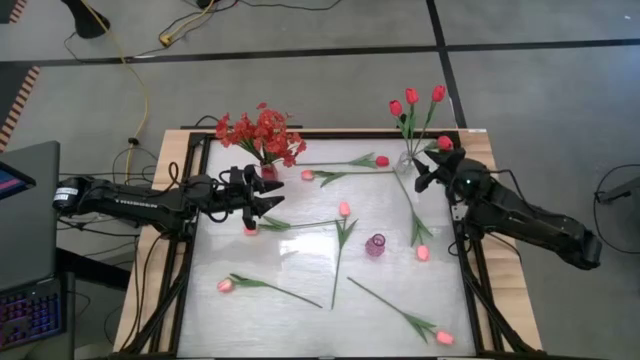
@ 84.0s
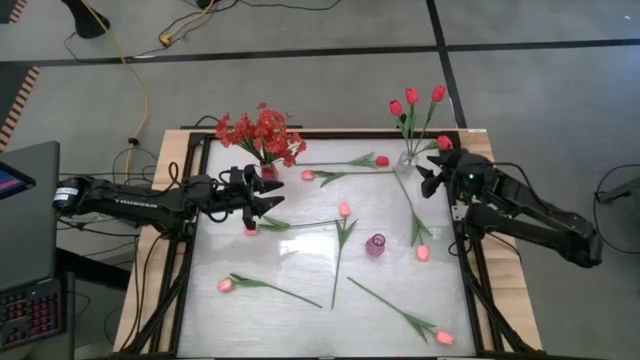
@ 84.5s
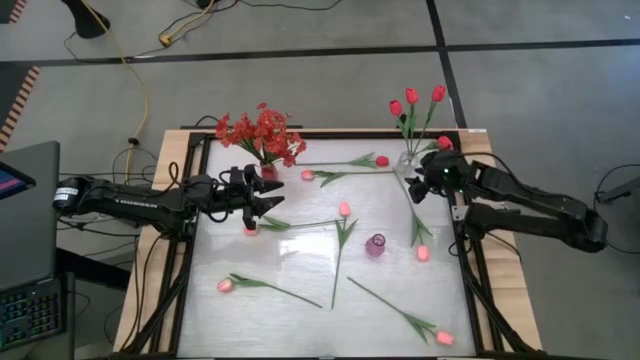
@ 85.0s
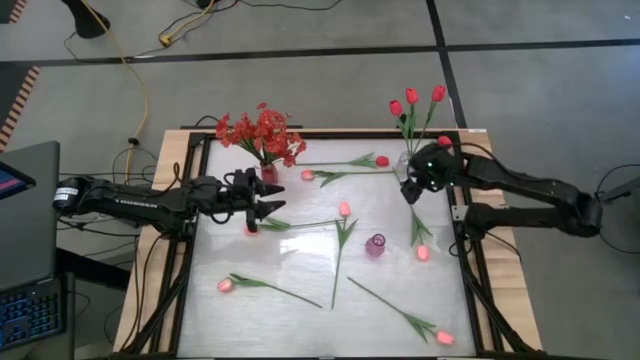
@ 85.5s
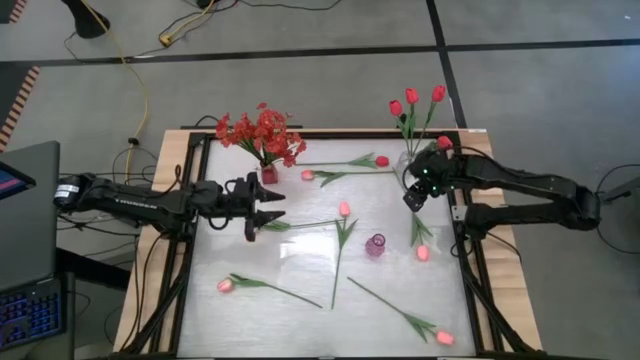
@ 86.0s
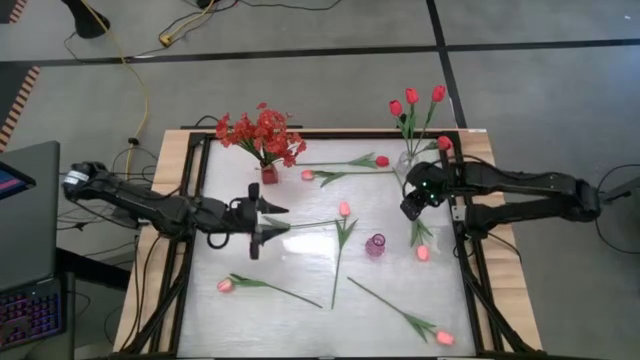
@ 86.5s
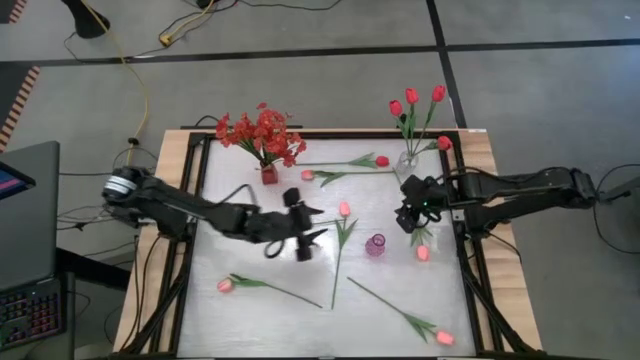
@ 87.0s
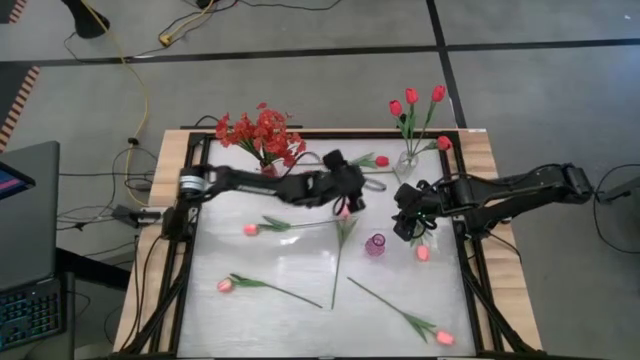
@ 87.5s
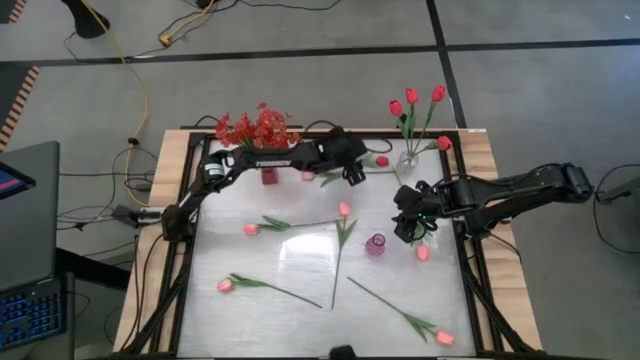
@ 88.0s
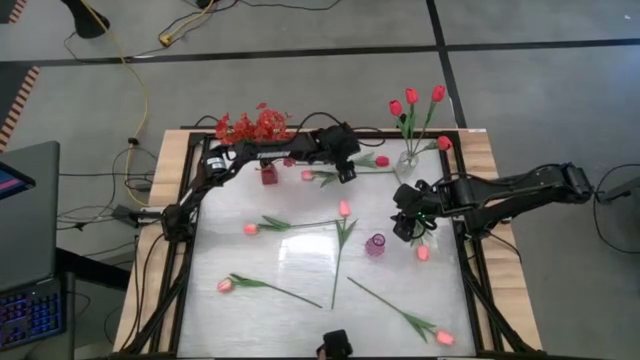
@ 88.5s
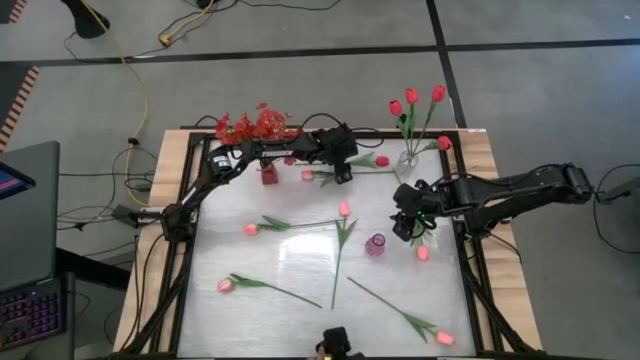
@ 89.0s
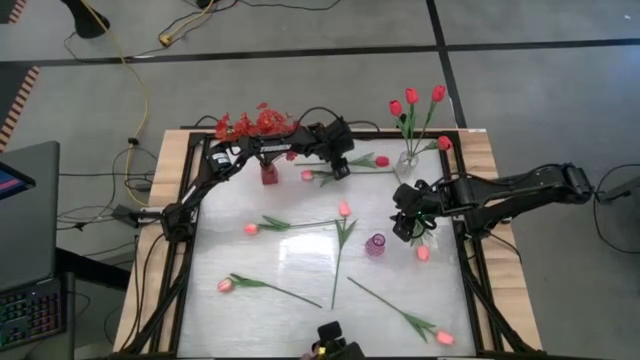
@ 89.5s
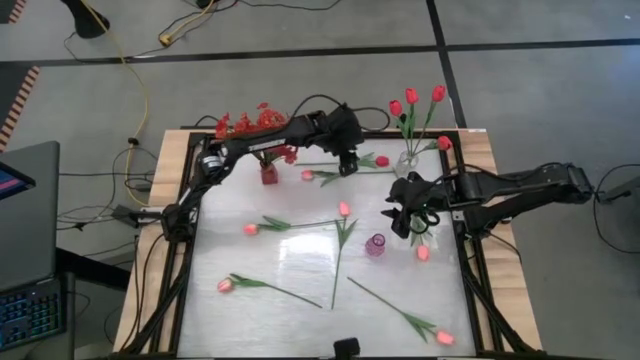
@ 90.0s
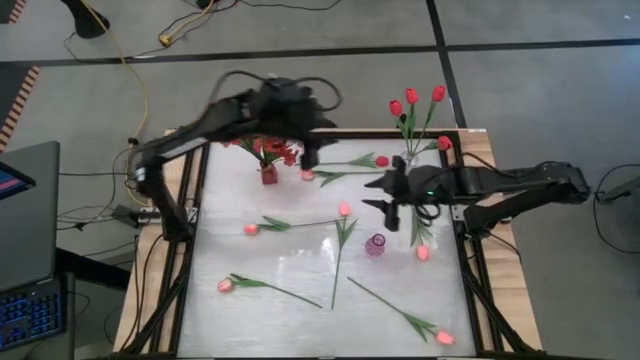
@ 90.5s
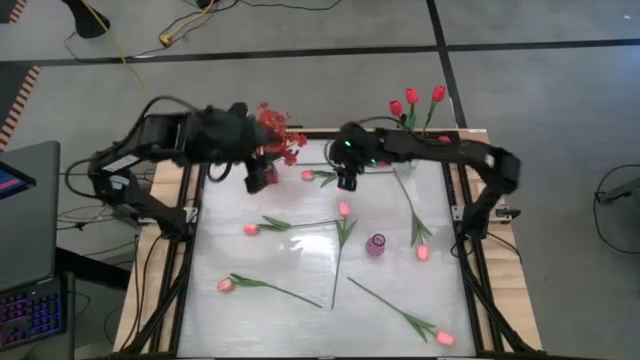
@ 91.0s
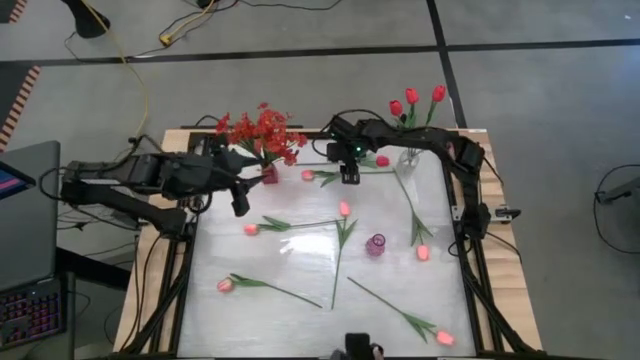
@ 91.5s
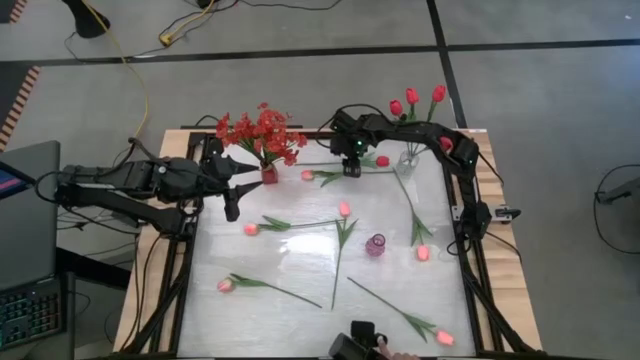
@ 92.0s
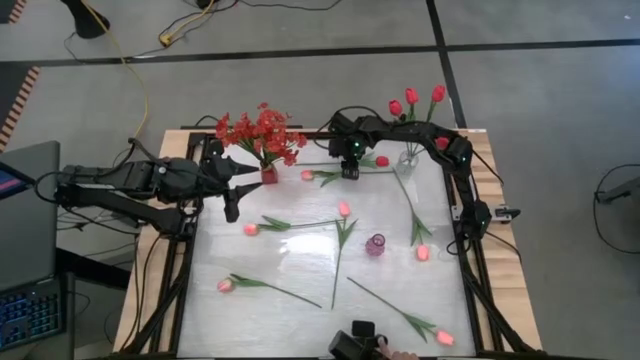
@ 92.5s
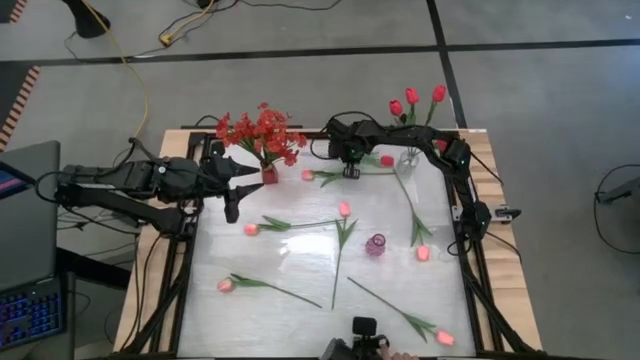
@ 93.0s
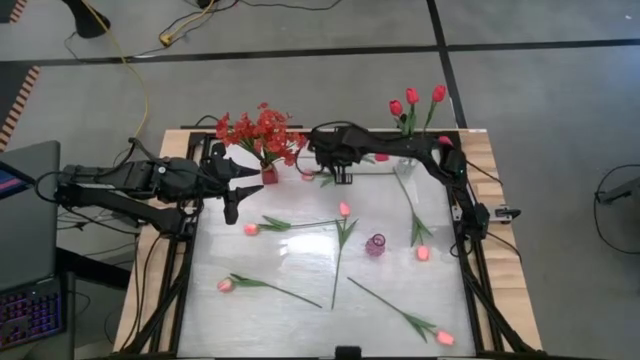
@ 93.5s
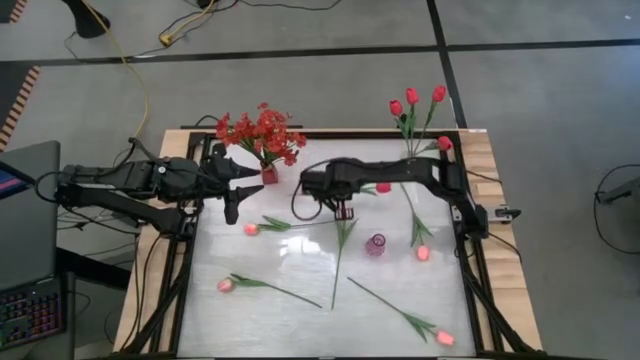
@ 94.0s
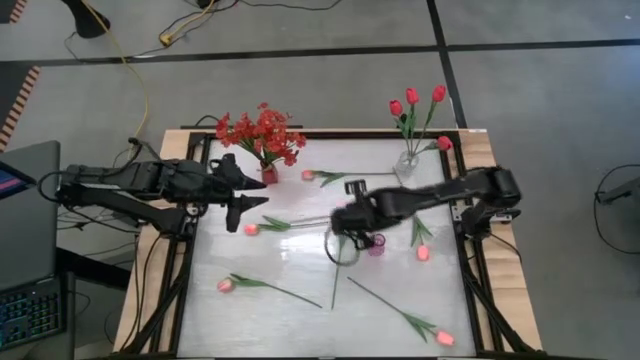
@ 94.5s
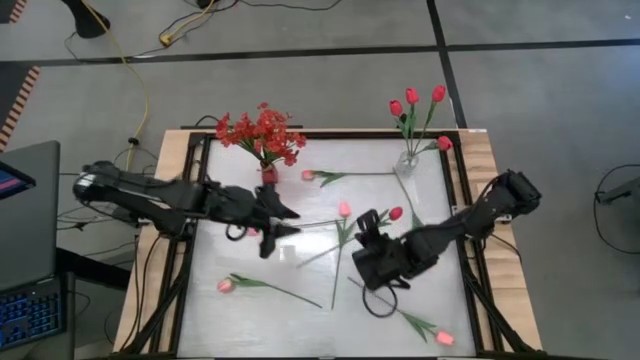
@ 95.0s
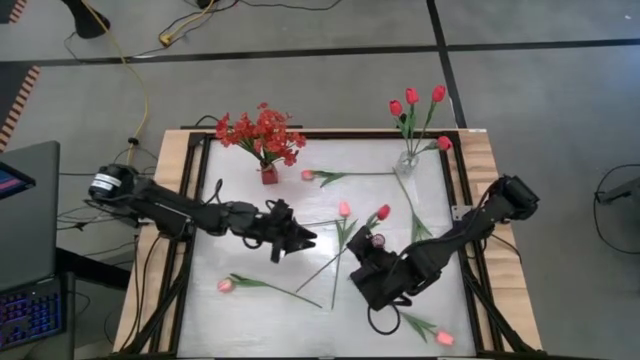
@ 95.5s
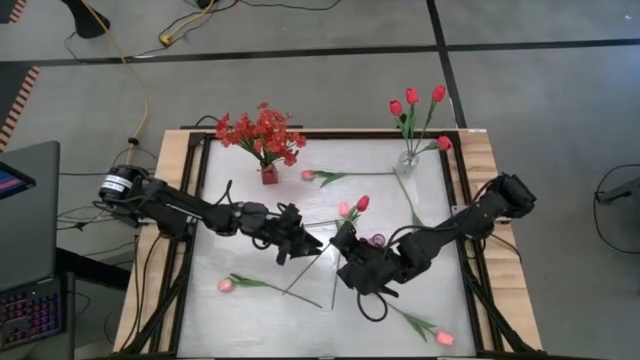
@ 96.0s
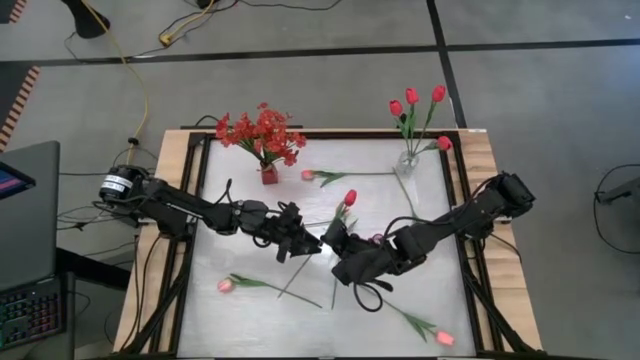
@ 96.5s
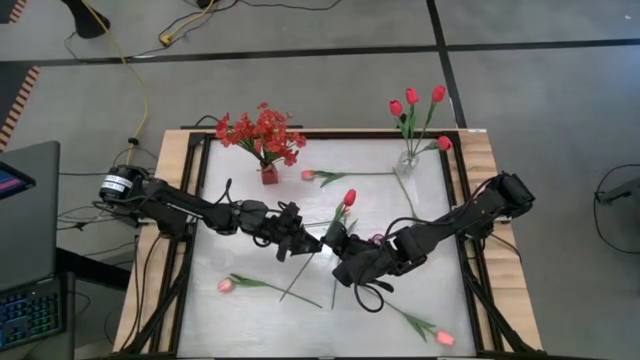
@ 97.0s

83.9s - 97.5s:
Task: Sort flowers into vase by color
Put the red tulip into the transparent flower vase

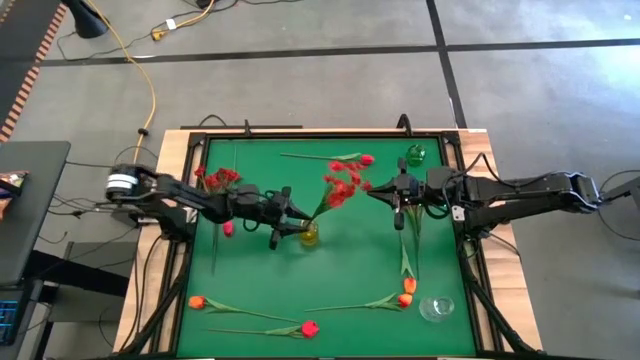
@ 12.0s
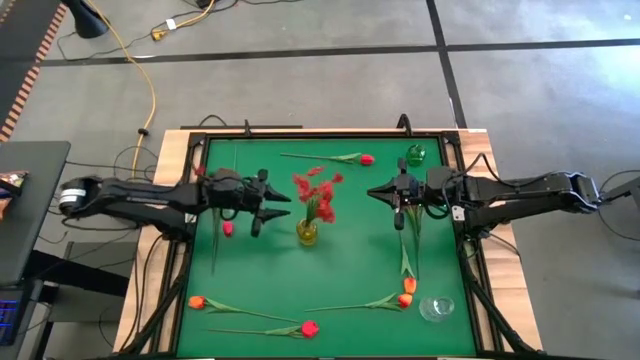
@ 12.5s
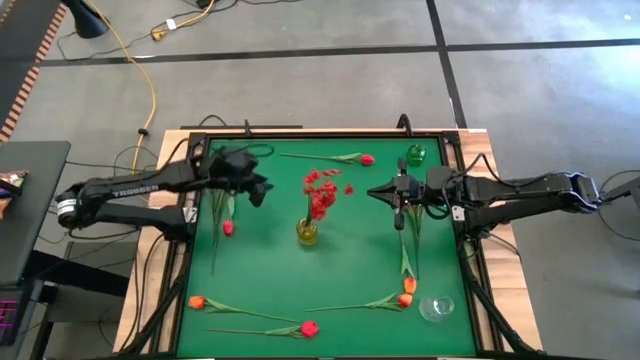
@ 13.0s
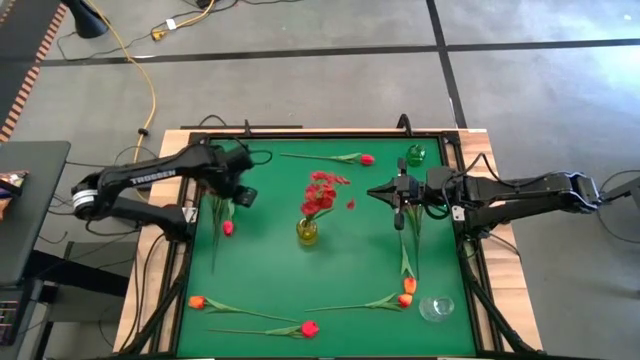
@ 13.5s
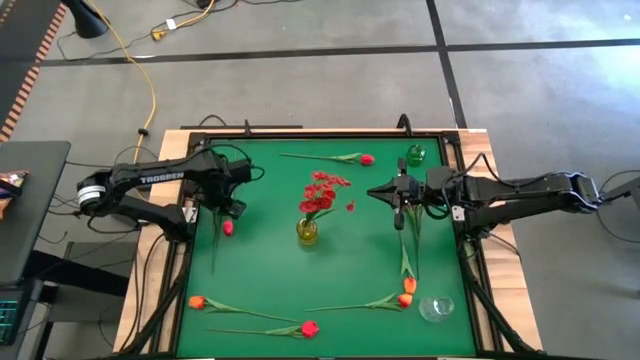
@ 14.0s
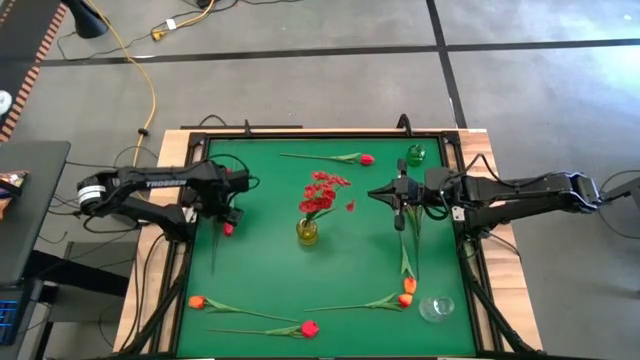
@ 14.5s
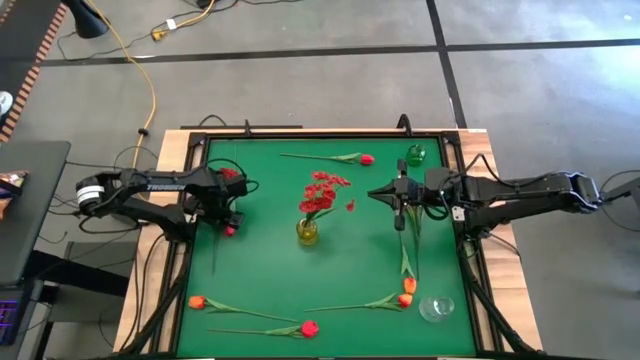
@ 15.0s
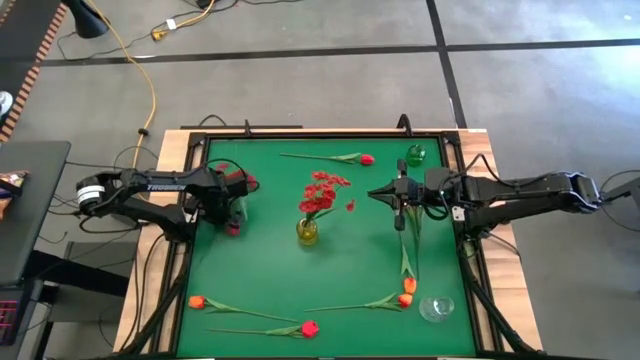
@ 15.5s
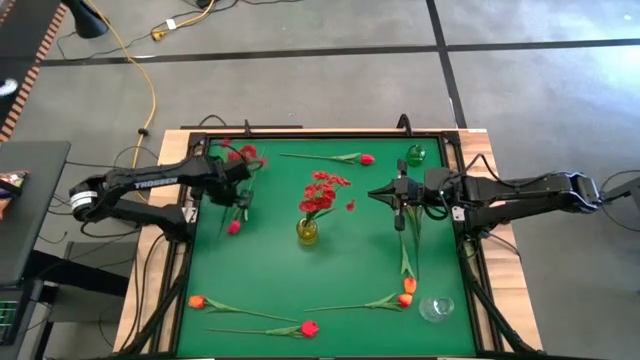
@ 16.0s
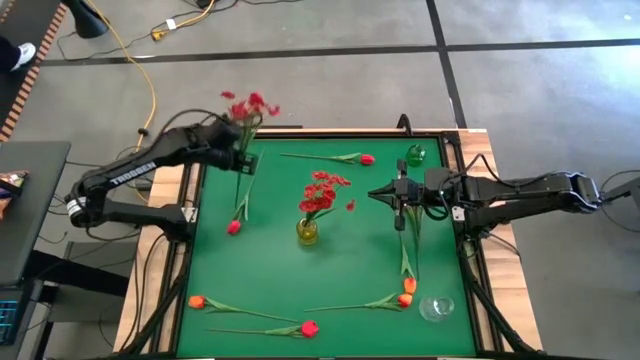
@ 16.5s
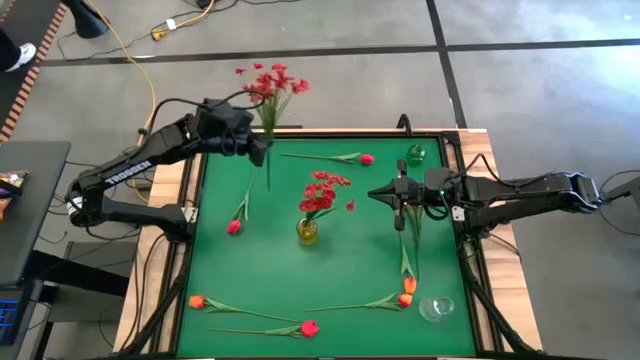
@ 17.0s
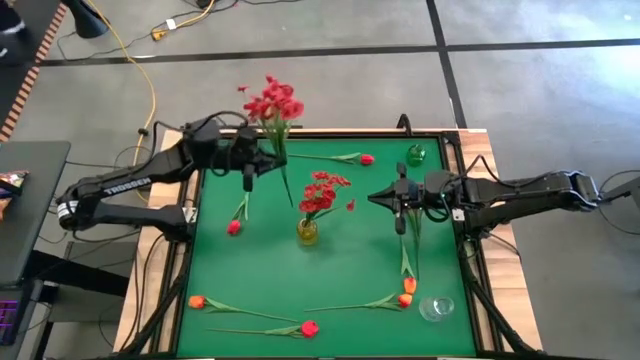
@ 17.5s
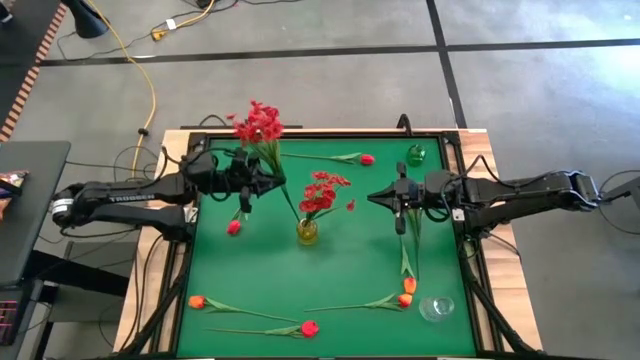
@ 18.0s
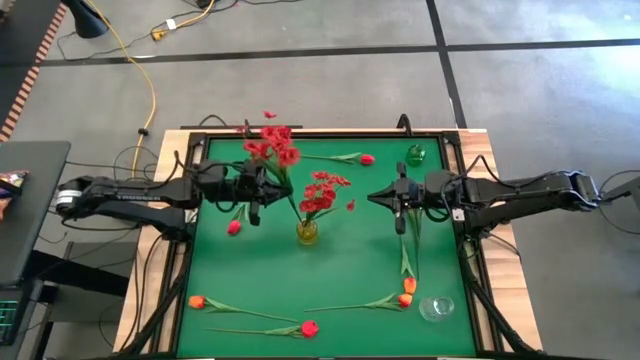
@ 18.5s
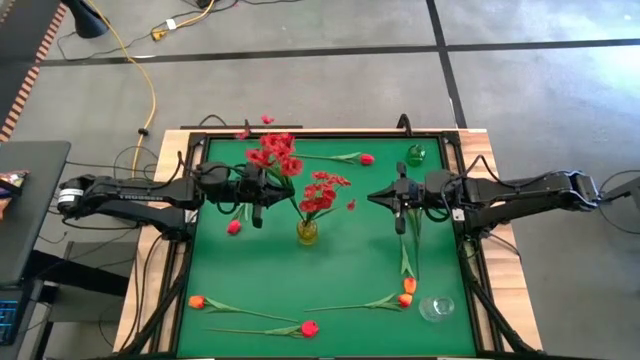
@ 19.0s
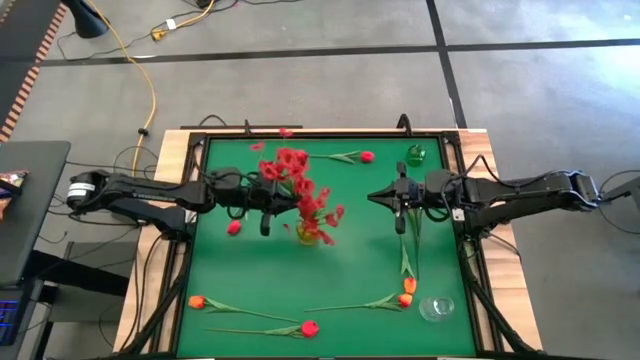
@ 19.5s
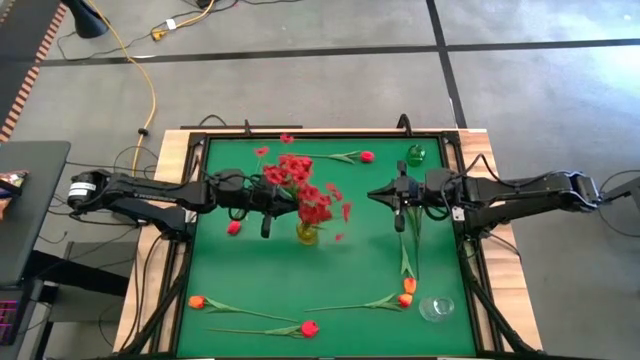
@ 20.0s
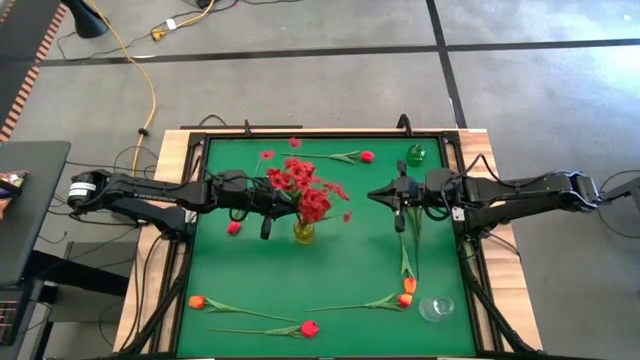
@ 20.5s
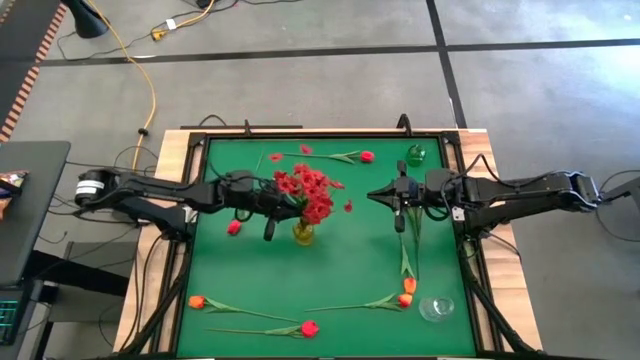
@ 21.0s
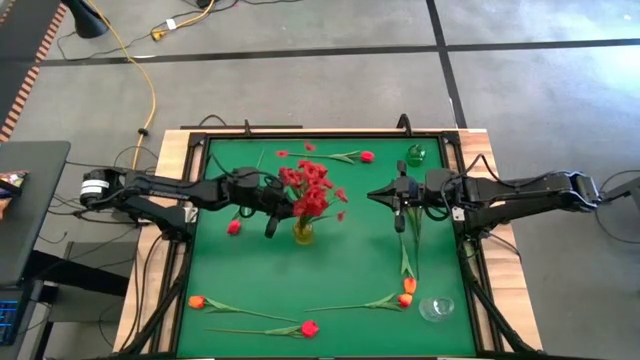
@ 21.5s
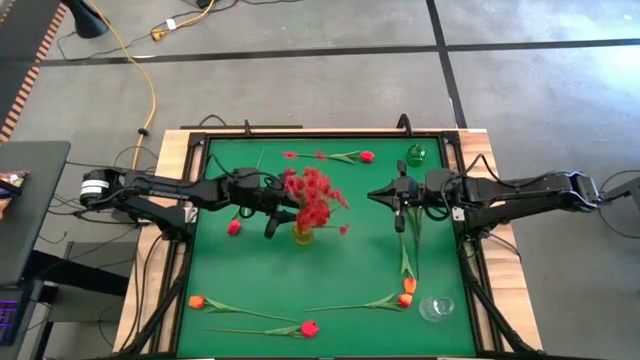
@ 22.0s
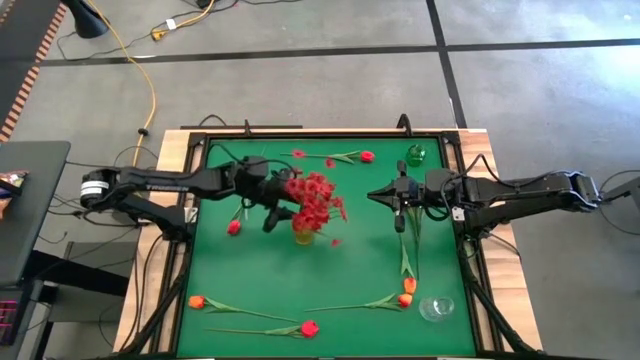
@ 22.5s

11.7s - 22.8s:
Task: Sort flowers into vase by color
Put the left red flowers into the yellow vase
